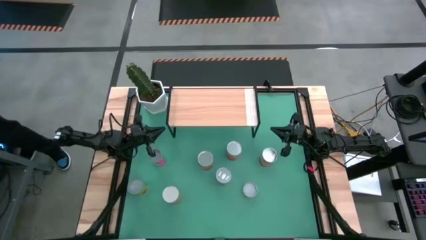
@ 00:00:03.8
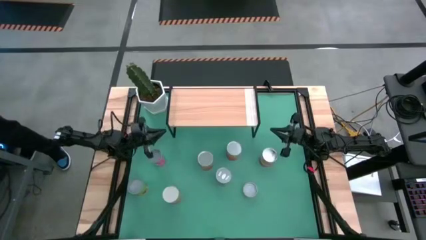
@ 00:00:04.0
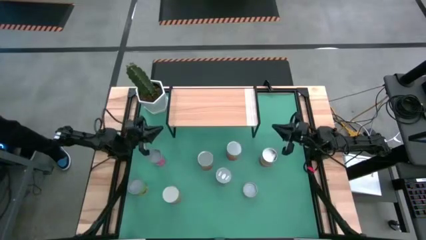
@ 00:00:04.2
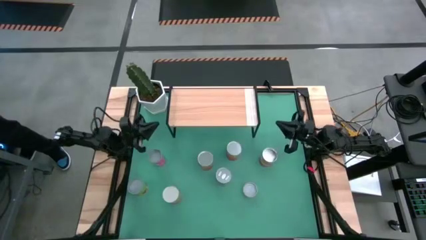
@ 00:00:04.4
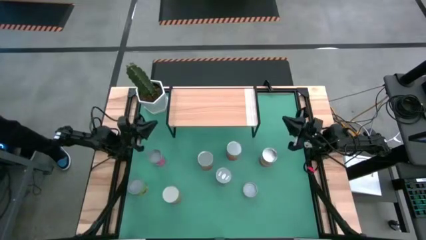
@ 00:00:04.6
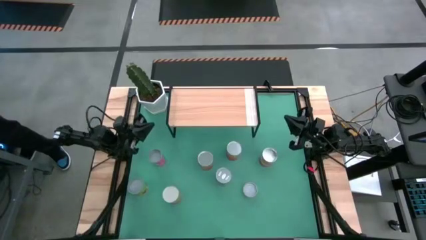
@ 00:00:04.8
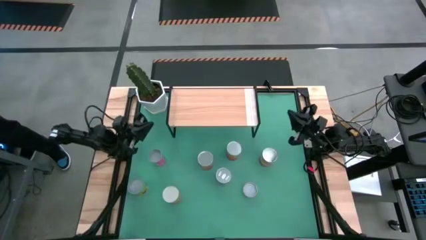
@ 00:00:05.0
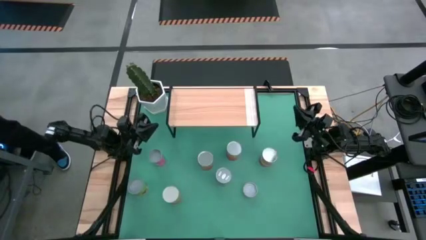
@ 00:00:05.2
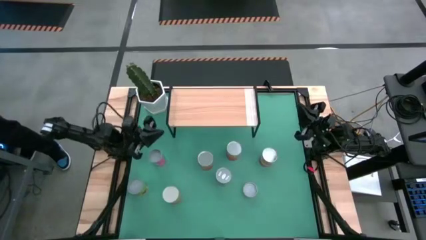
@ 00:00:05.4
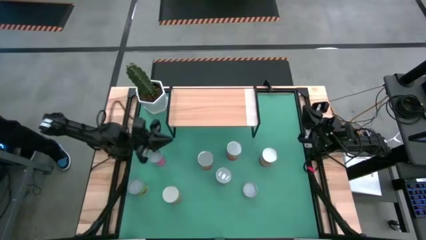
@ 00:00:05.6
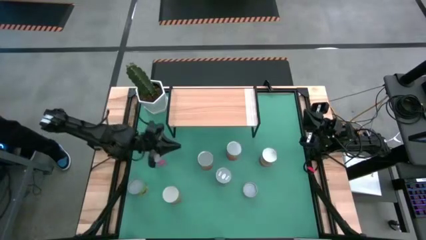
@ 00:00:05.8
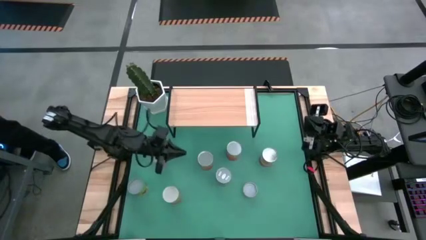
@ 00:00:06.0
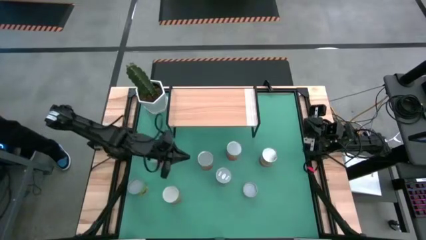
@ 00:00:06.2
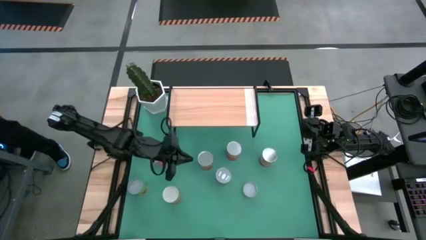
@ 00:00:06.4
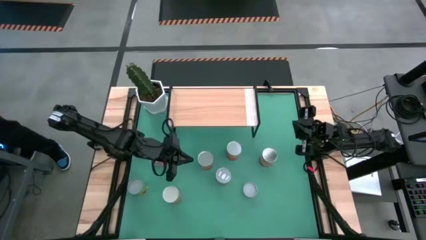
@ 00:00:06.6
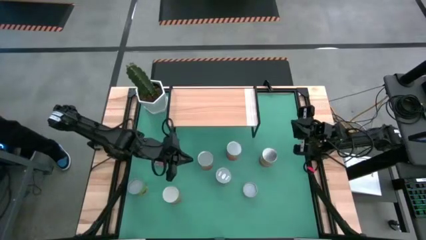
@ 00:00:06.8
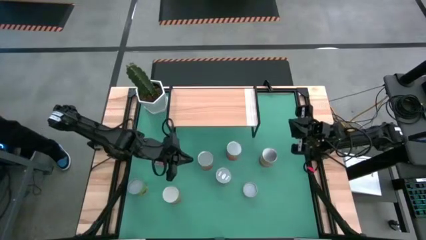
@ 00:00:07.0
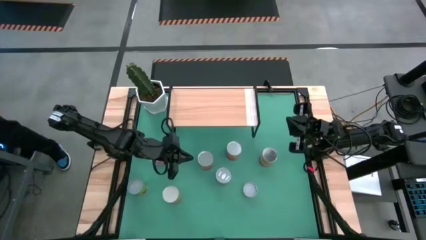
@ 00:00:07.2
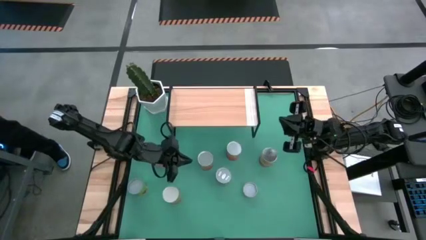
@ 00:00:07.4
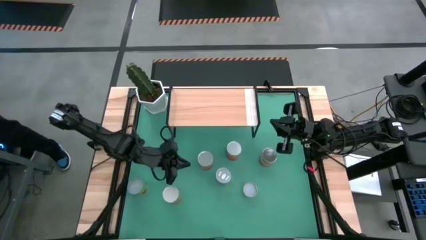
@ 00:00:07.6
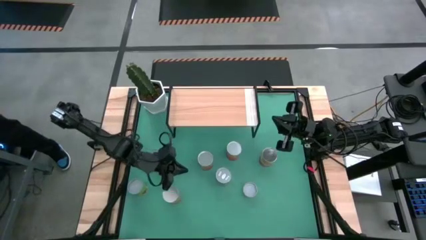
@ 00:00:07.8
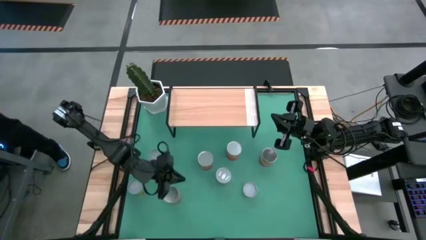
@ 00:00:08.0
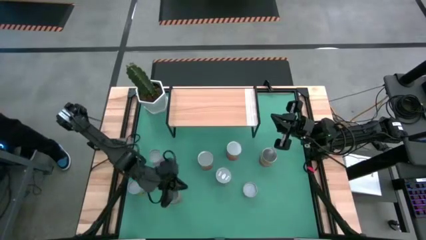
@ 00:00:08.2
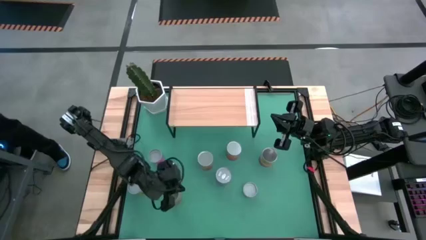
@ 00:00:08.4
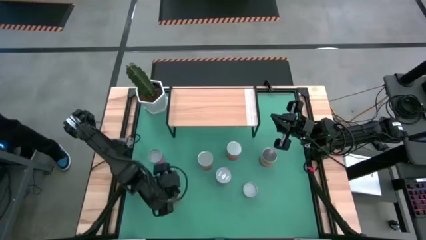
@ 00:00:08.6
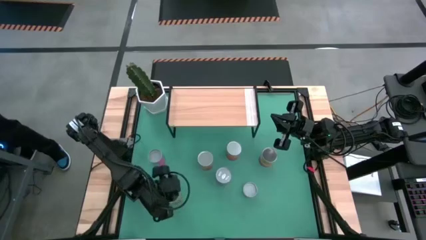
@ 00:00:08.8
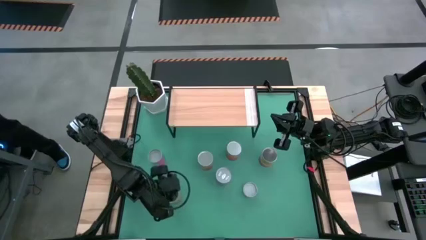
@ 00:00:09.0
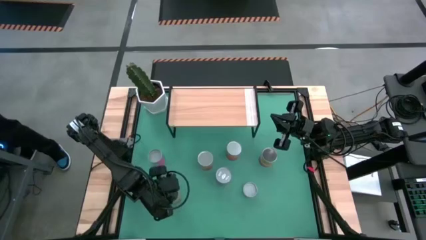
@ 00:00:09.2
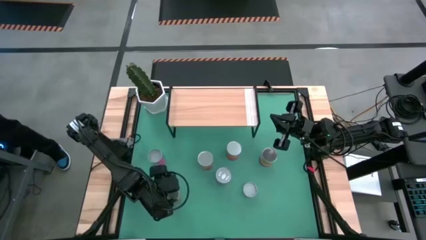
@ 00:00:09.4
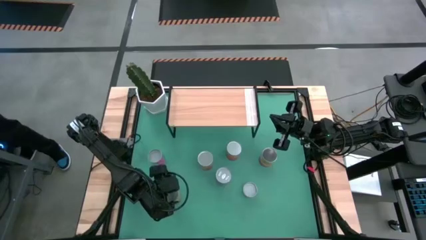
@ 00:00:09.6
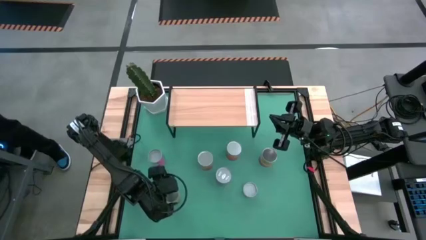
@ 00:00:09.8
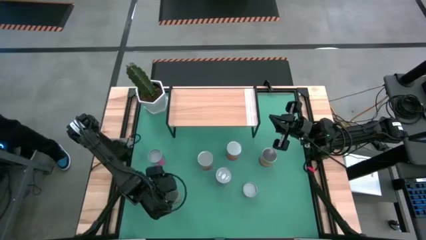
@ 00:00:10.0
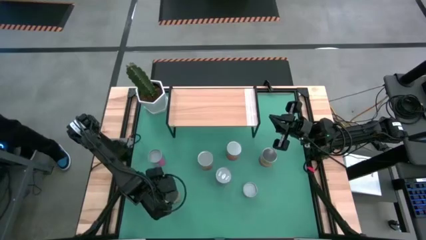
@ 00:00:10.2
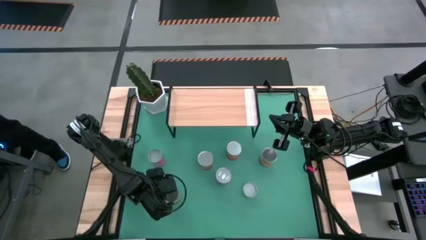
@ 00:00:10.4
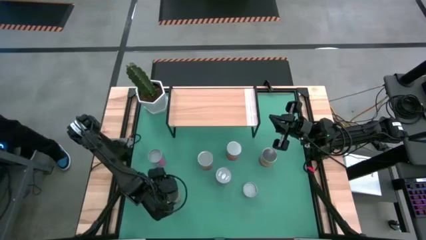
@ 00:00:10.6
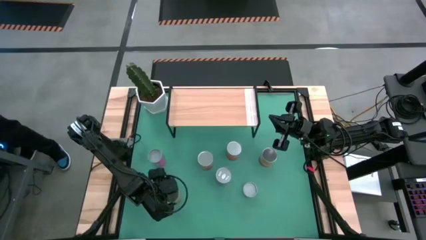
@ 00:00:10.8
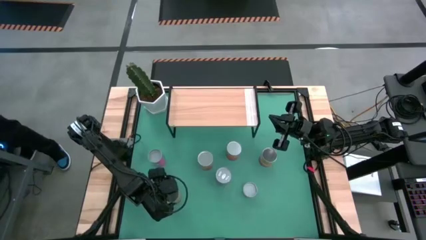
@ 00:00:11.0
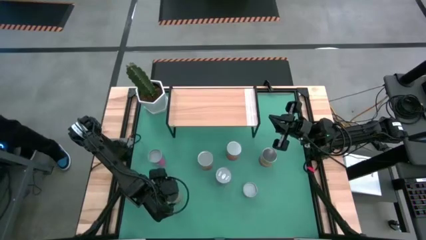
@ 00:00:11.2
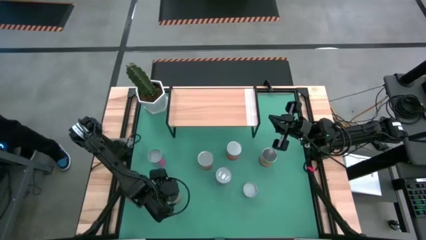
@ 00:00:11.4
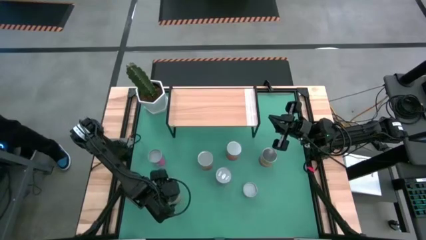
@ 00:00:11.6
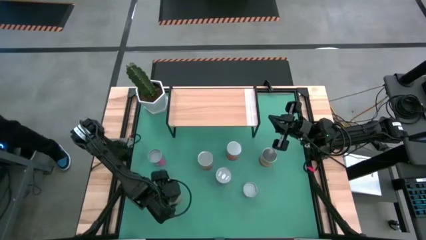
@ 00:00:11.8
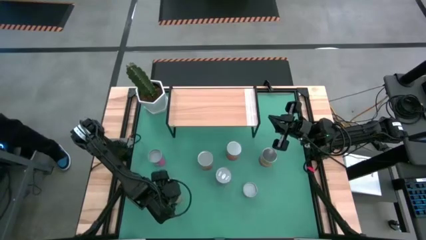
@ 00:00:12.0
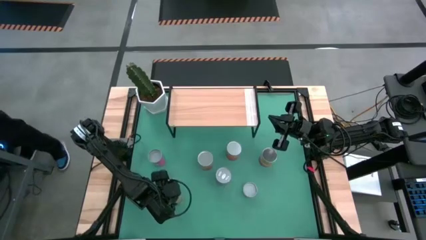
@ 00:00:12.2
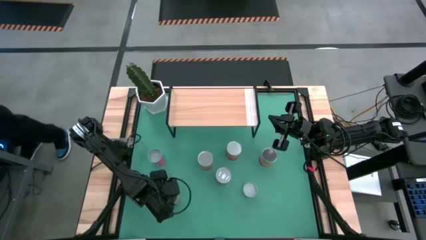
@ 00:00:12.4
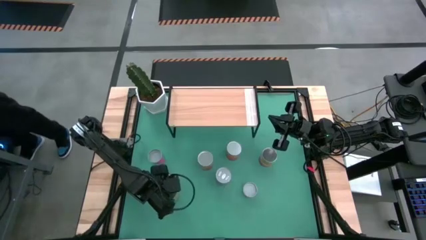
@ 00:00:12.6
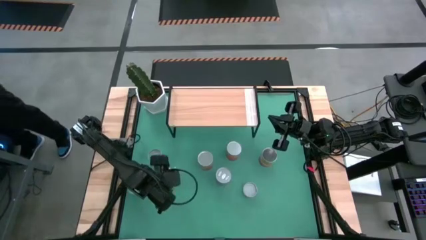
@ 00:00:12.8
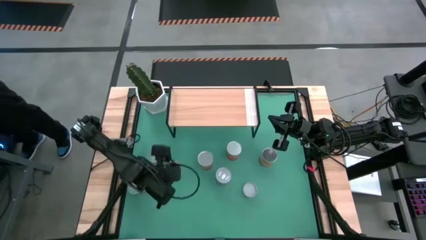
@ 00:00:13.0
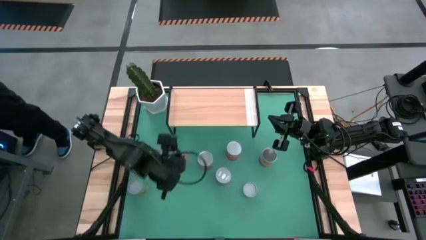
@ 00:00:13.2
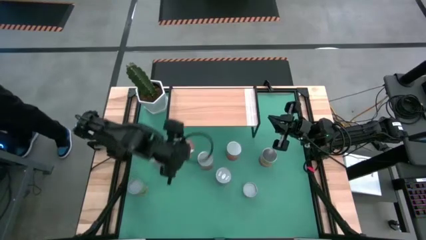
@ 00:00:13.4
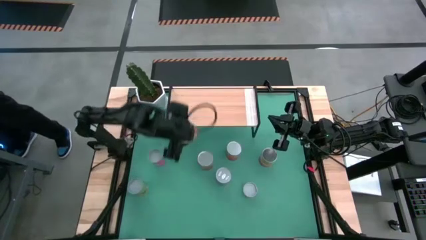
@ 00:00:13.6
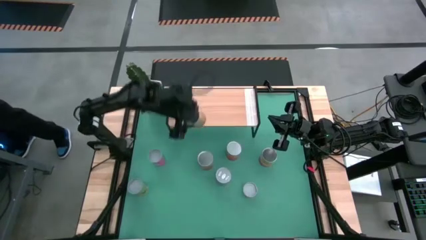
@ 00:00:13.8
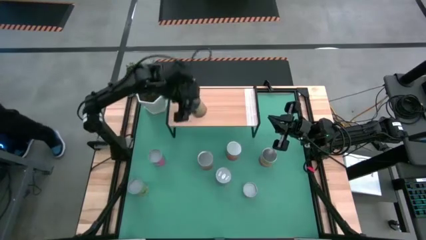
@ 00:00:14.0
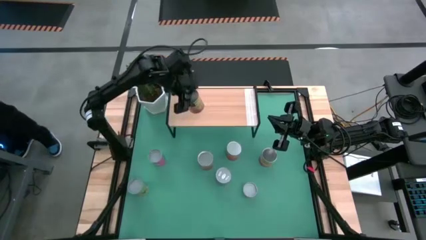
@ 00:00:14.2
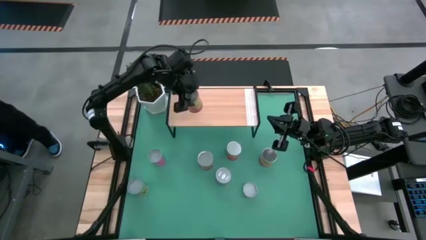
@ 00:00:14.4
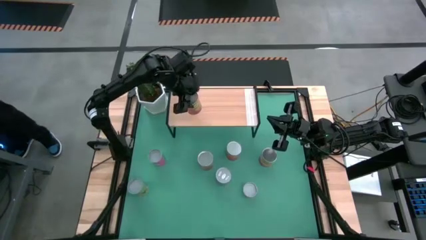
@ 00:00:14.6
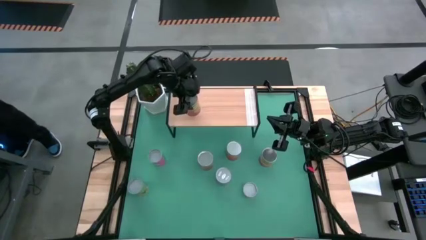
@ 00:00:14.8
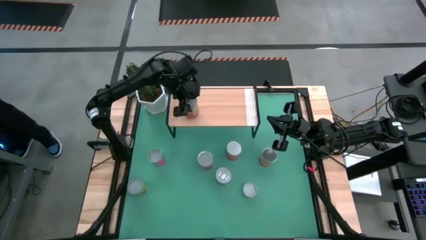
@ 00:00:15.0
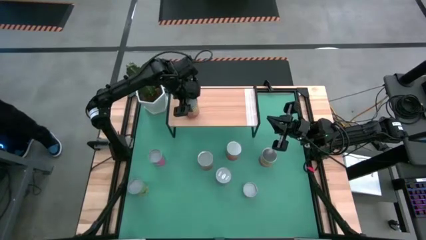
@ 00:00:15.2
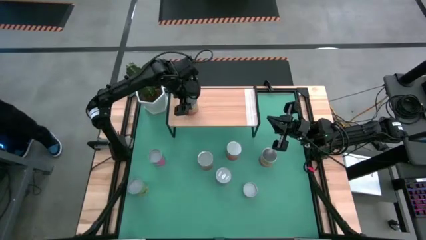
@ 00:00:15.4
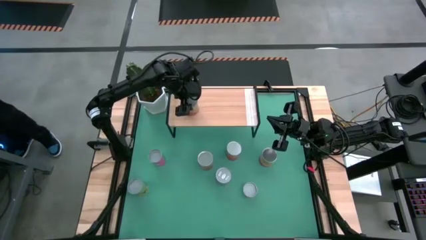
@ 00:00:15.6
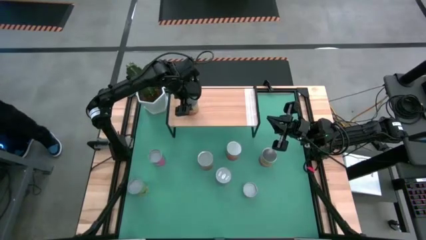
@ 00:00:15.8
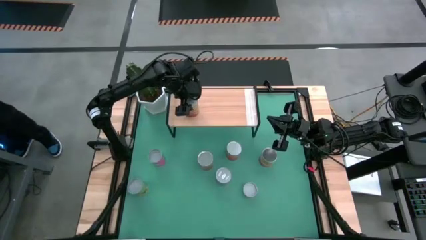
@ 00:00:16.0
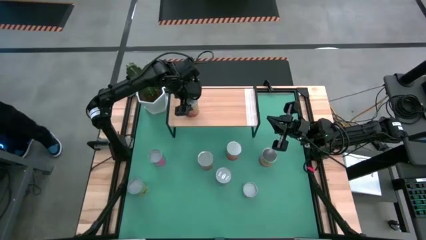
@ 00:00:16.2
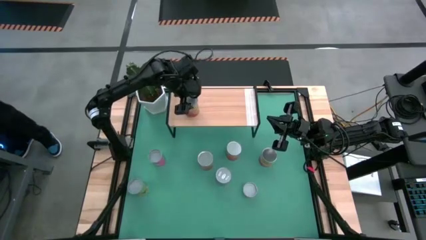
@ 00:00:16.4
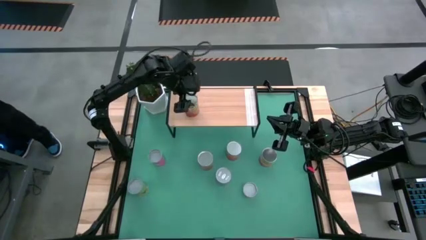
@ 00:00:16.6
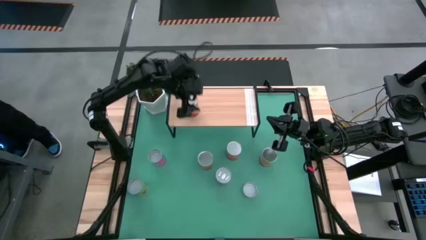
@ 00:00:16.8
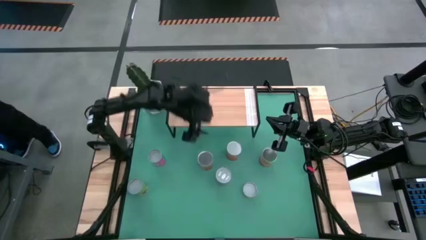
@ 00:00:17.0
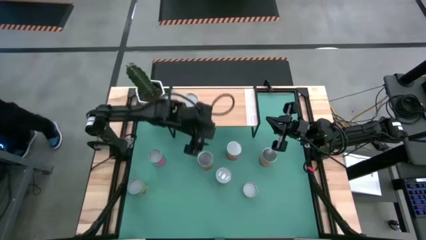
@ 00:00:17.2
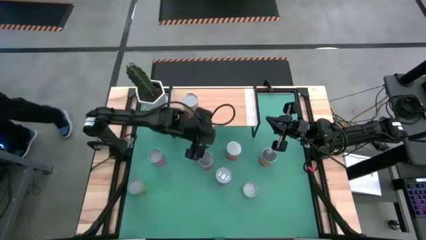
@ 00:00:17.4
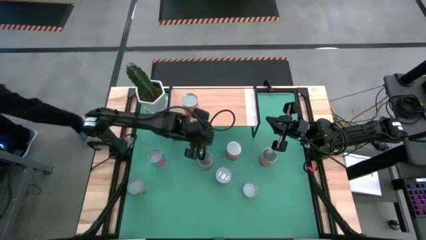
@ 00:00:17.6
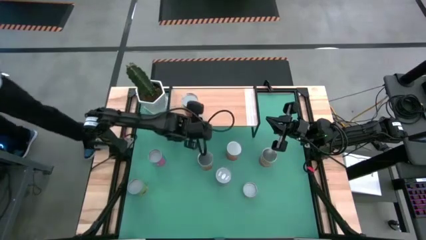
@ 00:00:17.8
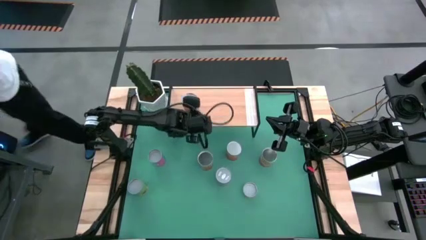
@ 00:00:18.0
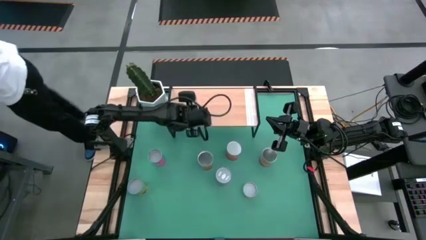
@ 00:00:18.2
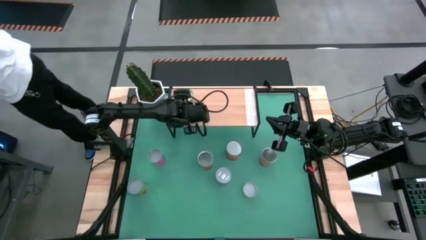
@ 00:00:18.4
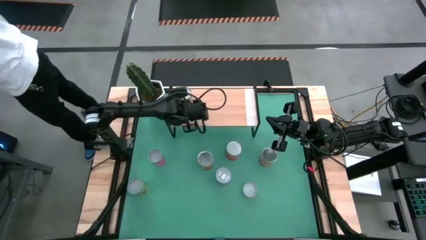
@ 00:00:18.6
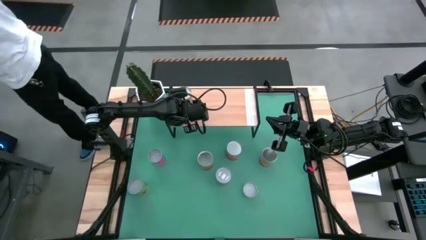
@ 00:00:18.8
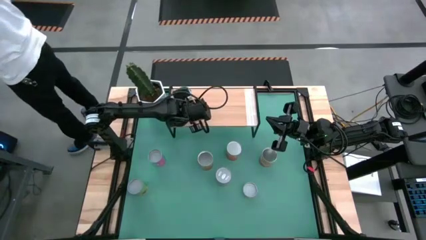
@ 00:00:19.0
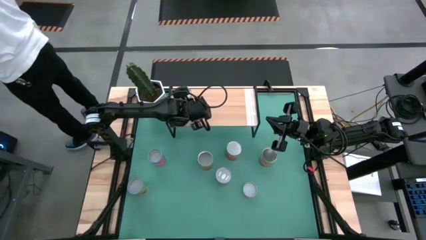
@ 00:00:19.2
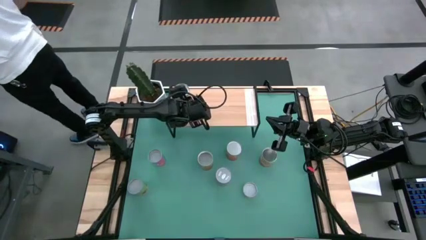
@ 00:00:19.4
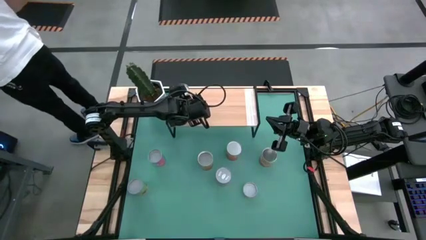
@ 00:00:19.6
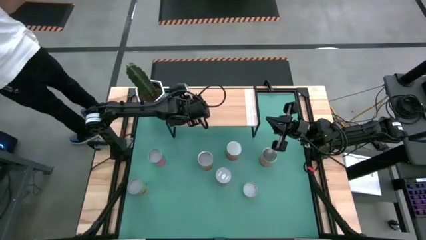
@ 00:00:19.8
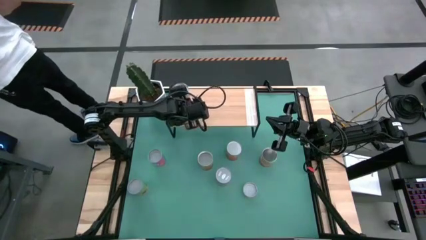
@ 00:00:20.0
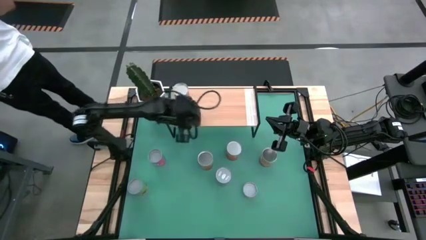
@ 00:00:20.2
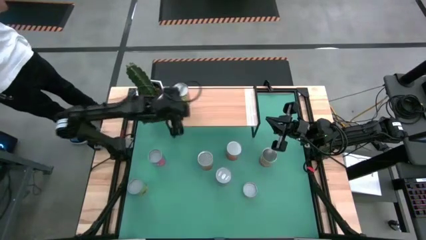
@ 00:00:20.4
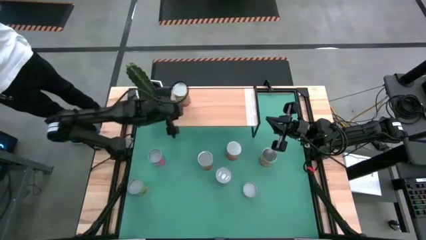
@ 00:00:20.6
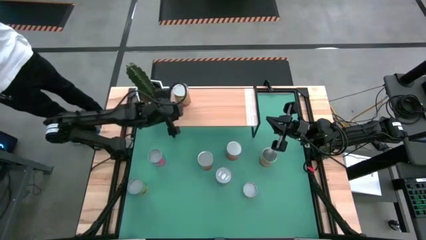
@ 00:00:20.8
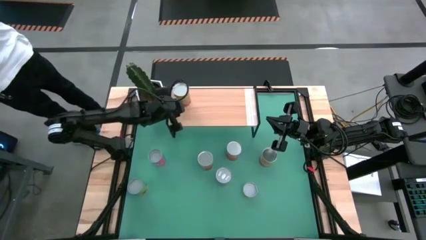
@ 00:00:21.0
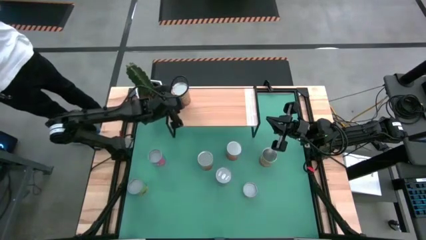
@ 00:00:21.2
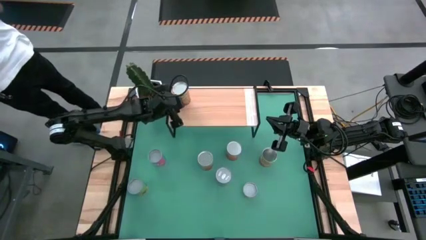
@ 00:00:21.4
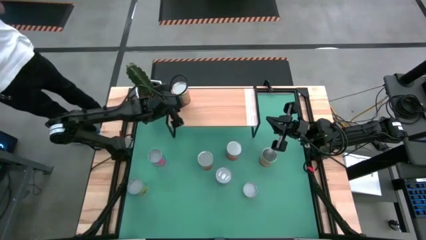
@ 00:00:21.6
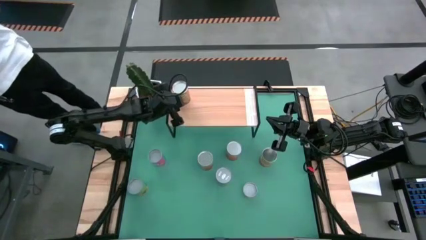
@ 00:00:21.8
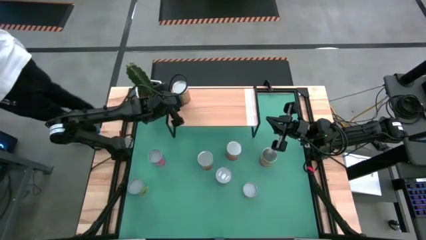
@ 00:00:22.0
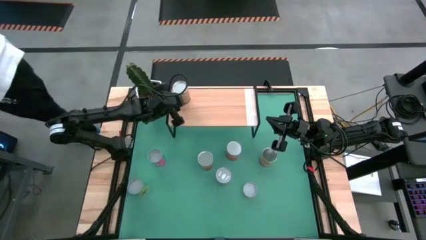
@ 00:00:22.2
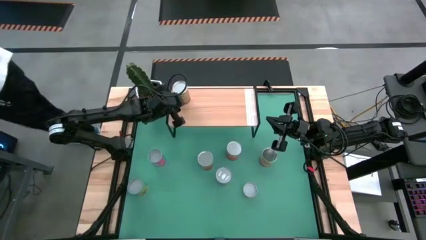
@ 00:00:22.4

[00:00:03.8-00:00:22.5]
Task: Pick and place cans onto a shelf
Put the canned green beans on the shelf
